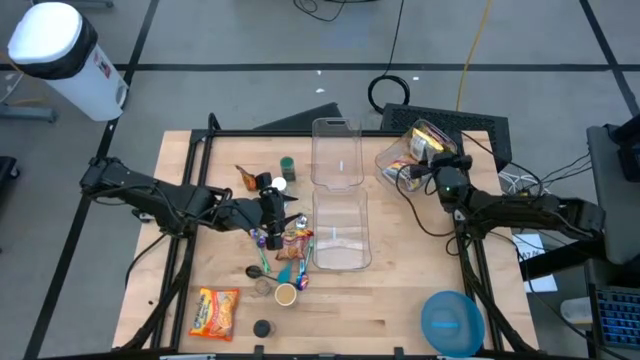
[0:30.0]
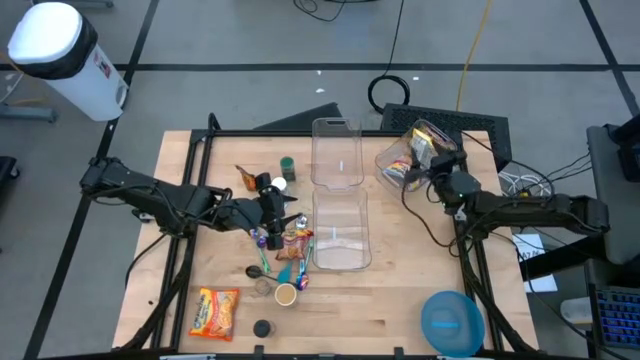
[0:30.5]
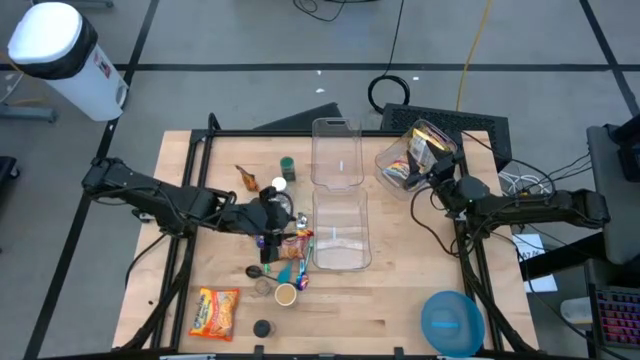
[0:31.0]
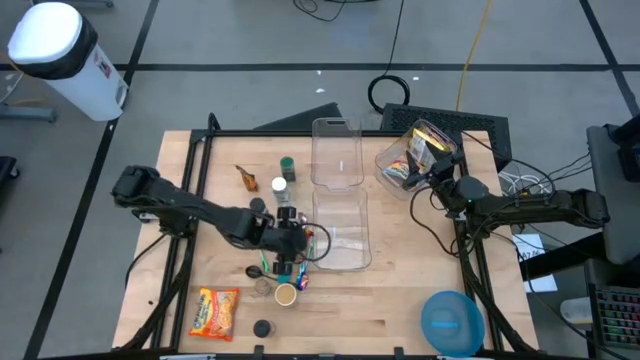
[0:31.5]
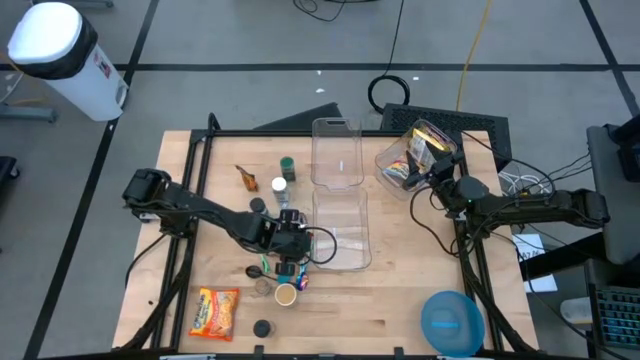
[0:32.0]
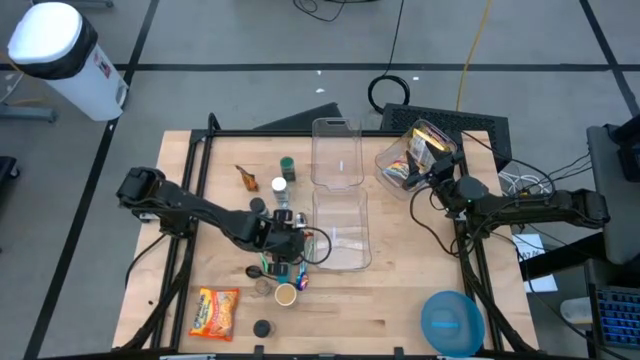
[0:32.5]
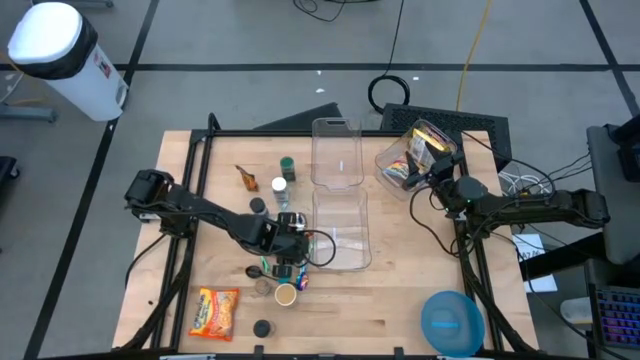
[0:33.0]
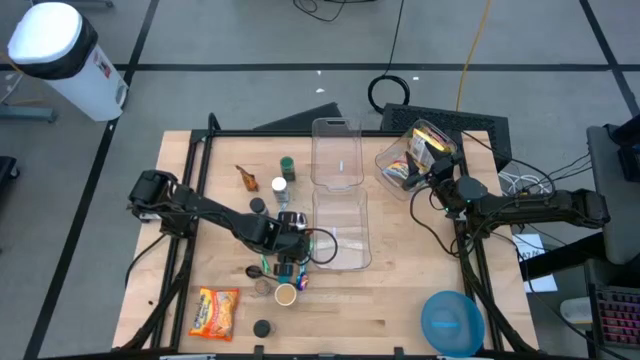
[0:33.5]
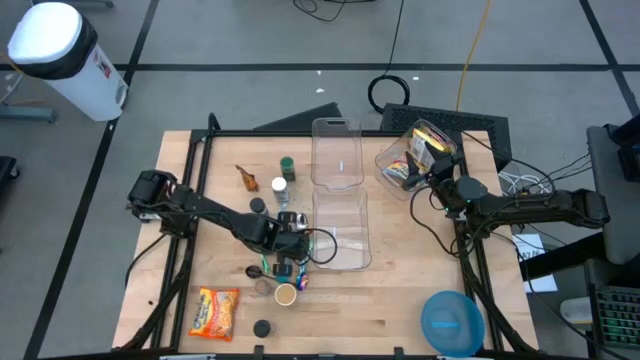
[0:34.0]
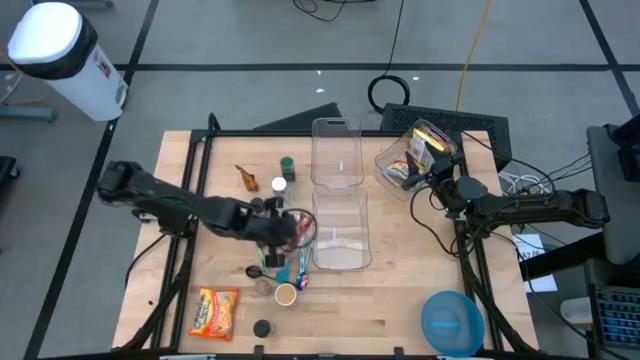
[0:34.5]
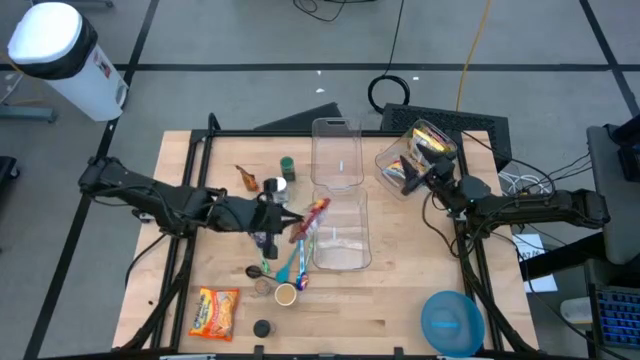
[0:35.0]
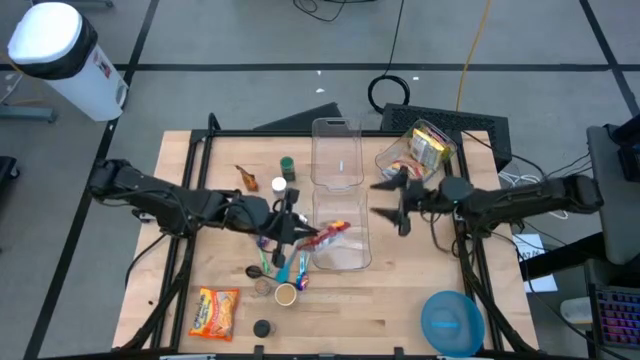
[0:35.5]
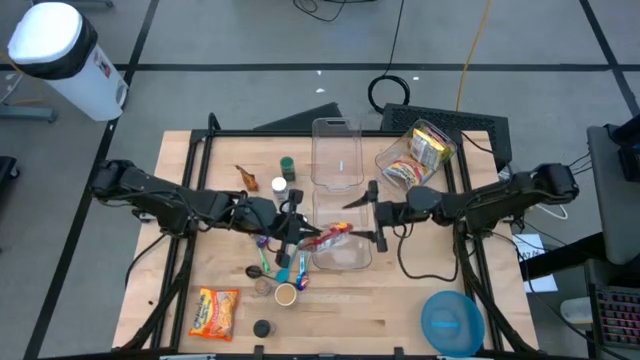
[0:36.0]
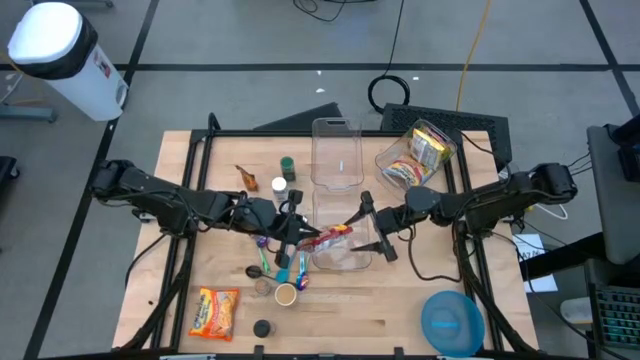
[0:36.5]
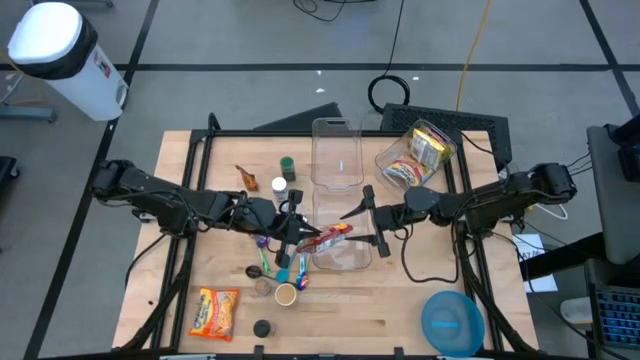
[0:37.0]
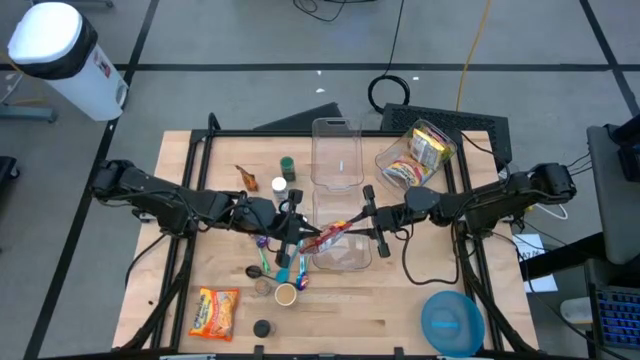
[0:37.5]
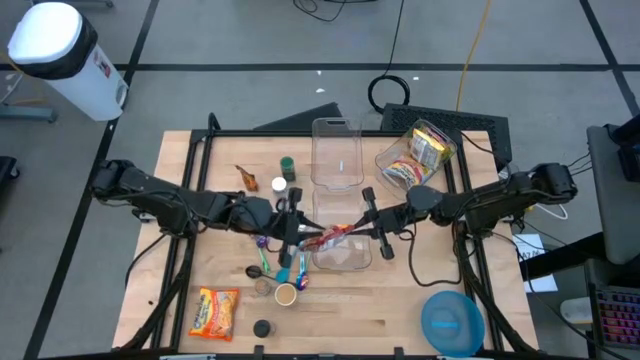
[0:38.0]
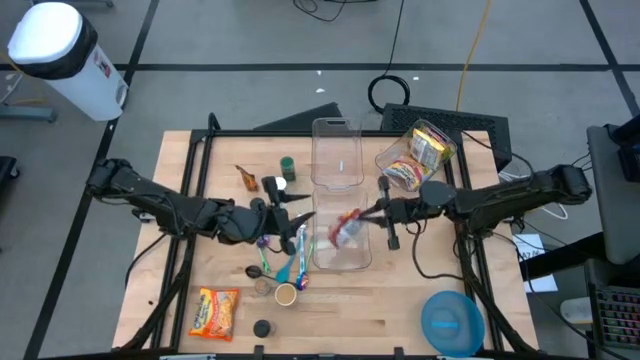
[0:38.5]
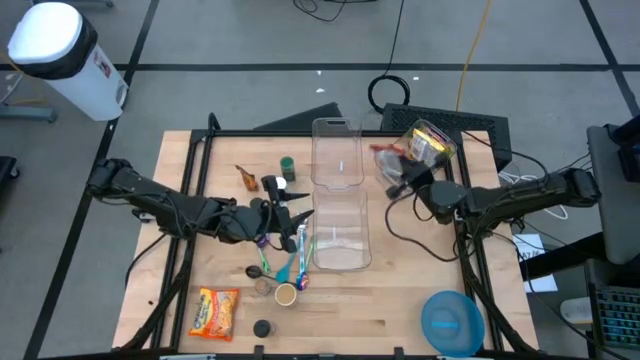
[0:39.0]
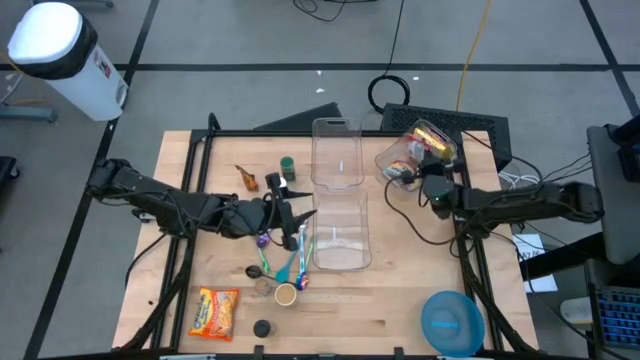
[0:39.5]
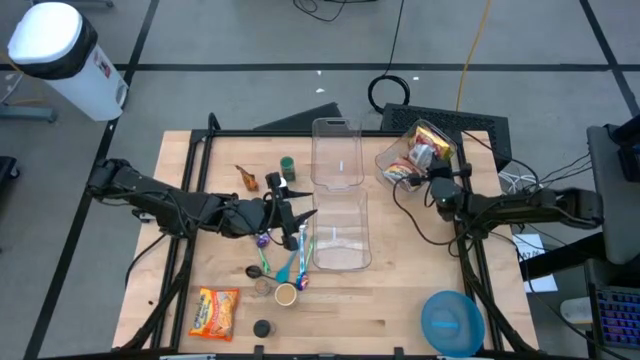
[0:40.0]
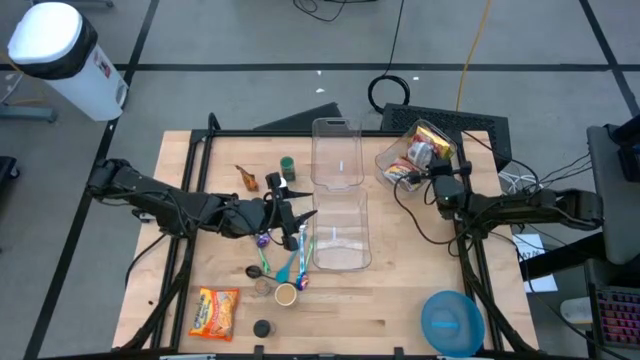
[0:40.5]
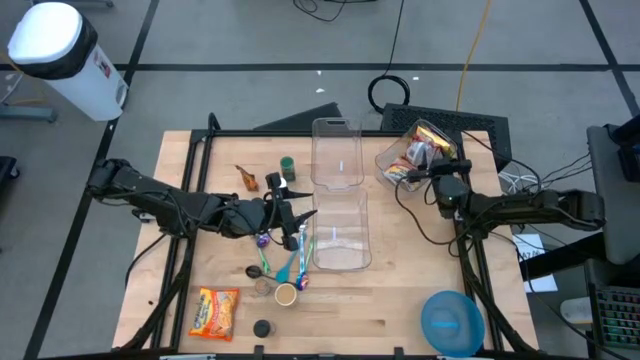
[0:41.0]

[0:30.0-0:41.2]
Task: Pick & Place Food Item
Put the red noodle pack into the top right transparent bin

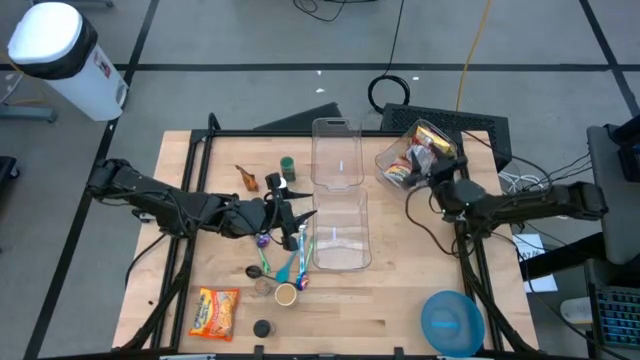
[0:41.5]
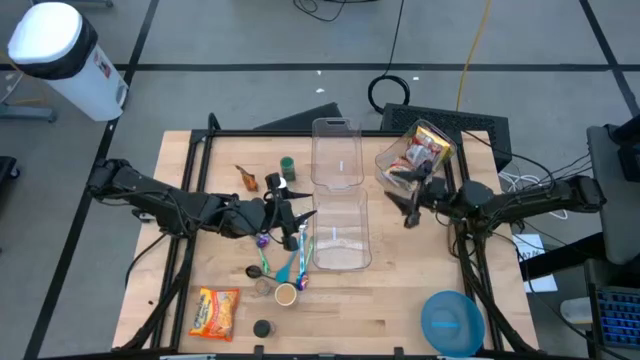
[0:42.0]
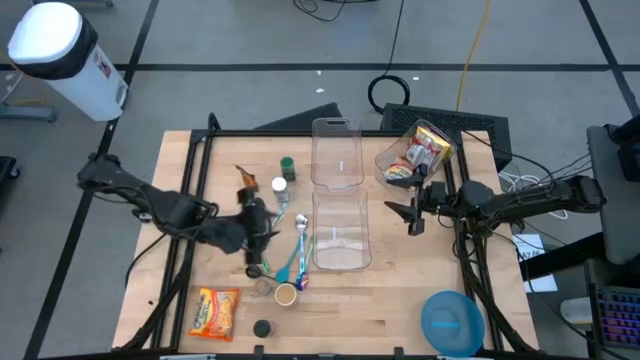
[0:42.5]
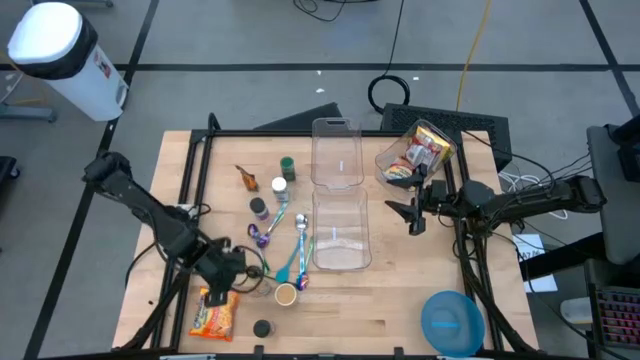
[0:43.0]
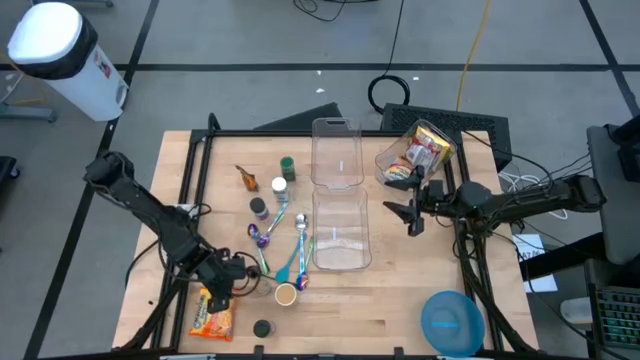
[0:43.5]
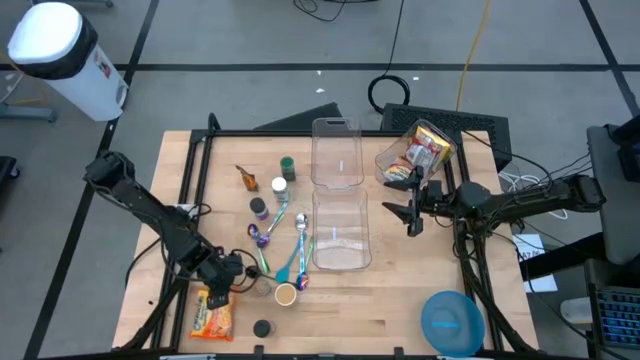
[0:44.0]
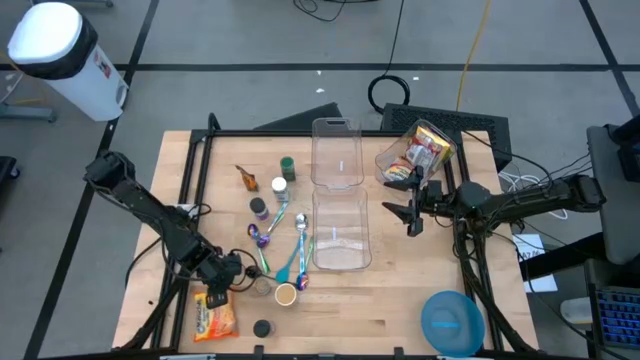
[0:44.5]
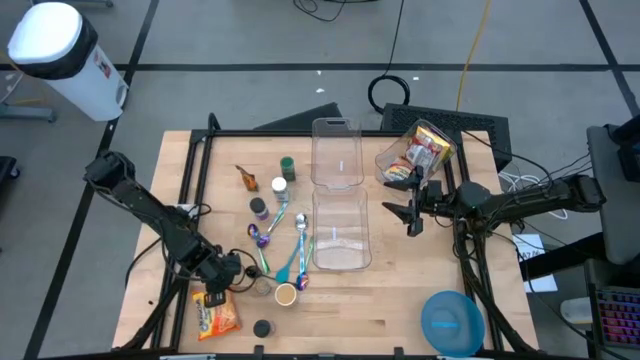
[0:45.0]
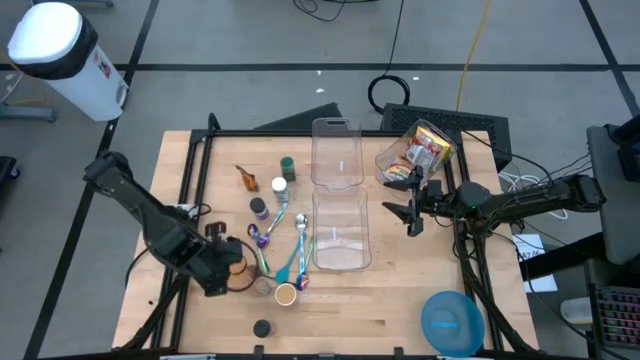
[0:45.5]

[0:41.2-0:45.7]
Put the orange noodle pack into the top right transparent bin

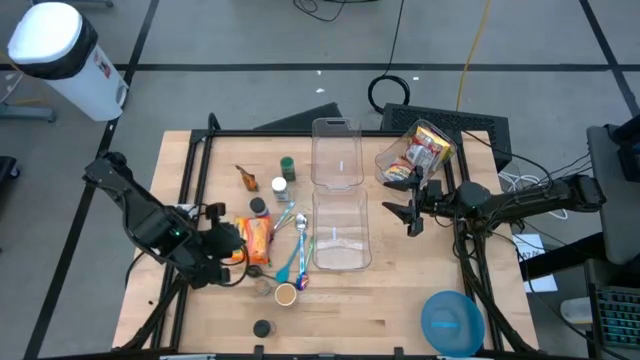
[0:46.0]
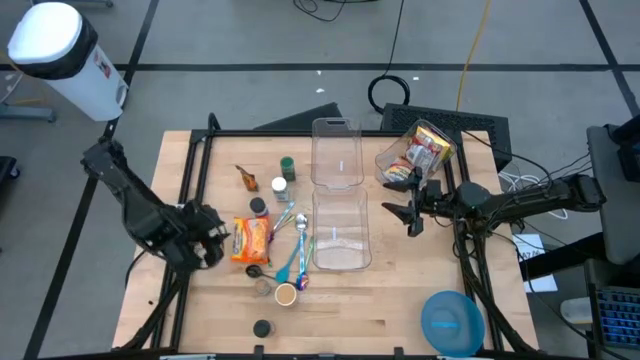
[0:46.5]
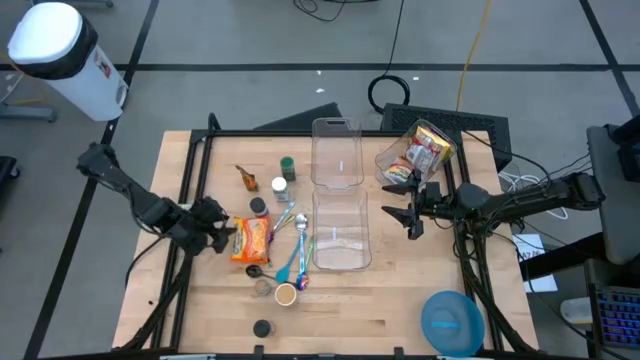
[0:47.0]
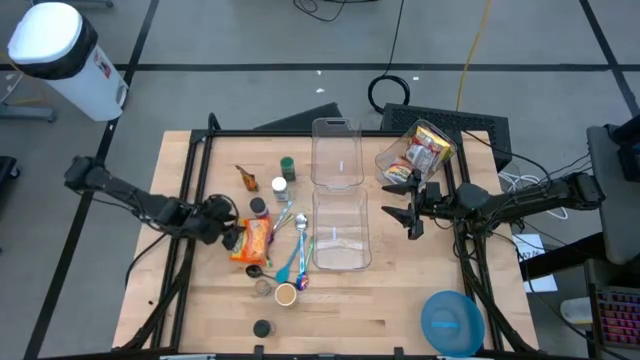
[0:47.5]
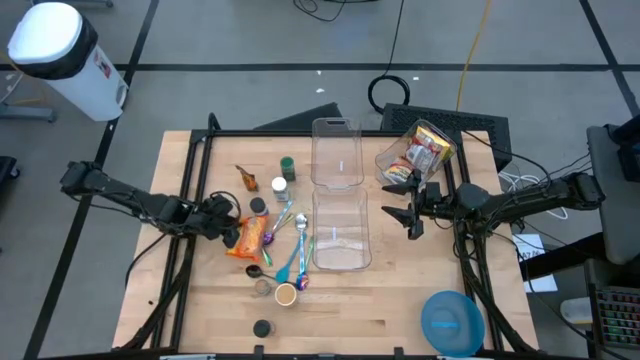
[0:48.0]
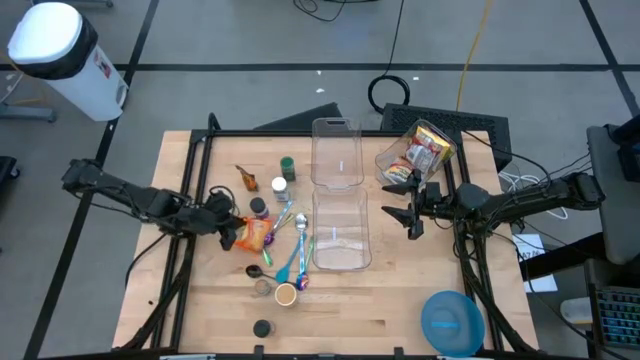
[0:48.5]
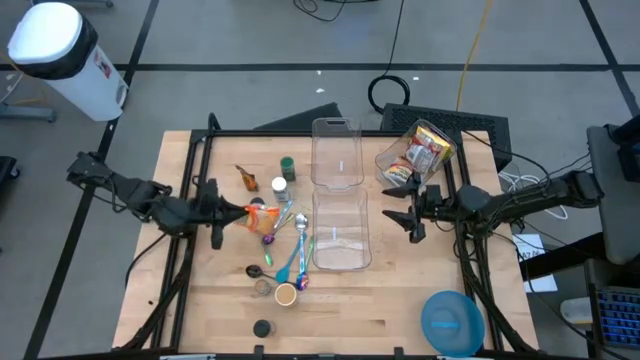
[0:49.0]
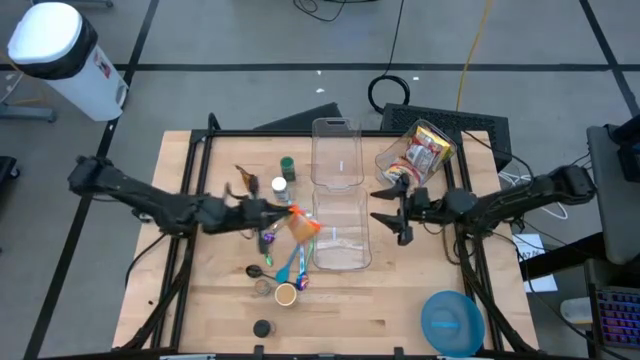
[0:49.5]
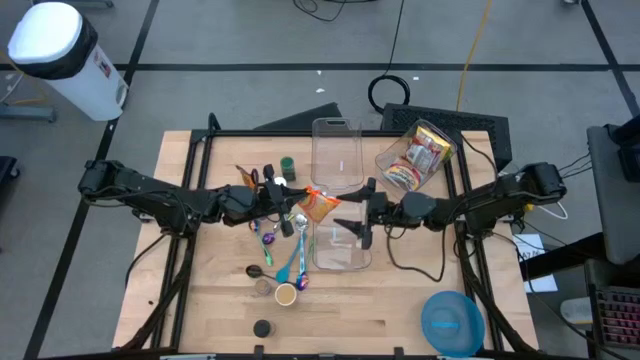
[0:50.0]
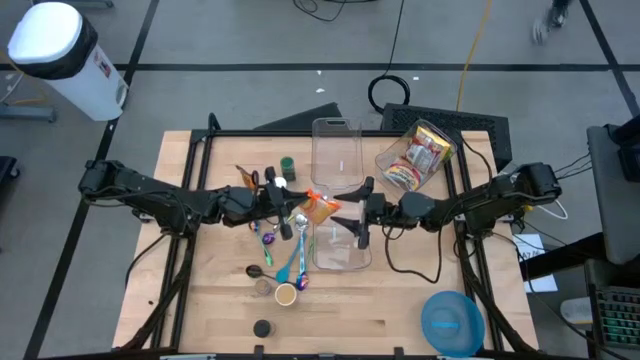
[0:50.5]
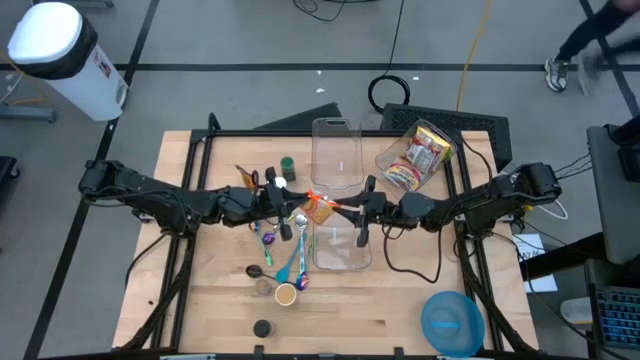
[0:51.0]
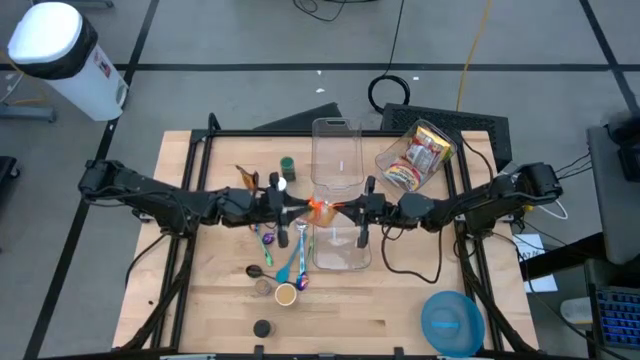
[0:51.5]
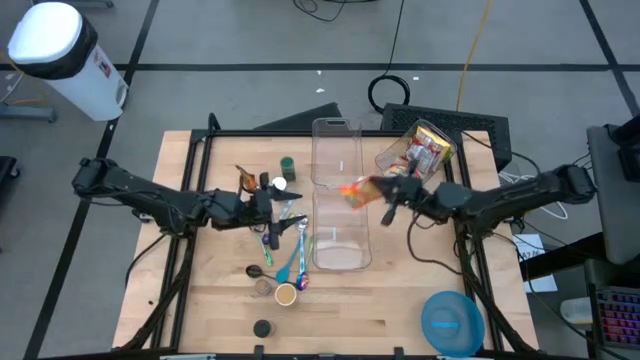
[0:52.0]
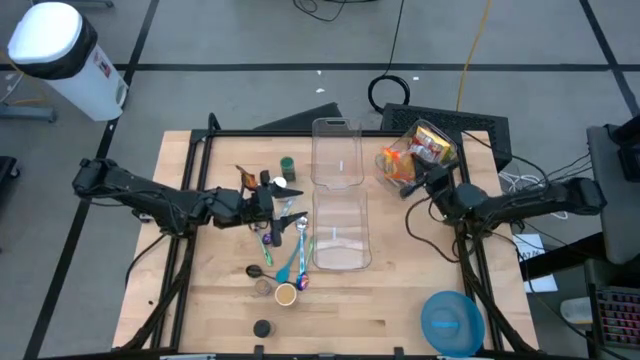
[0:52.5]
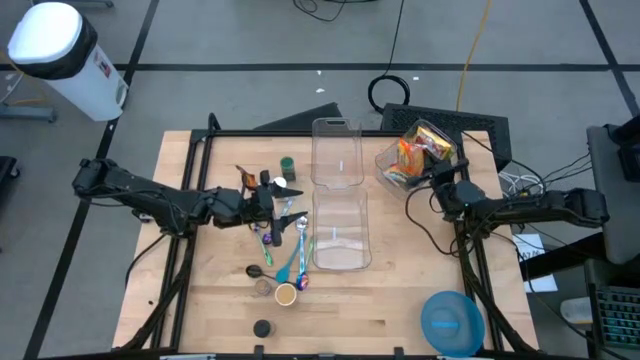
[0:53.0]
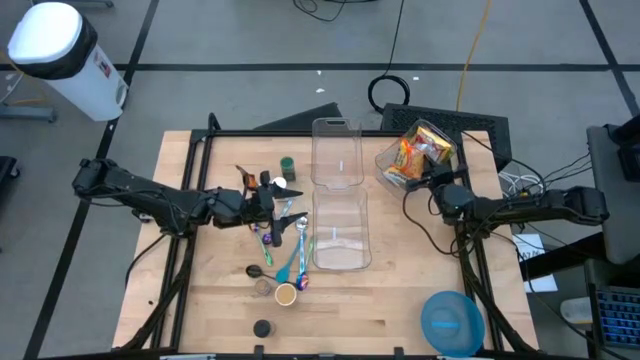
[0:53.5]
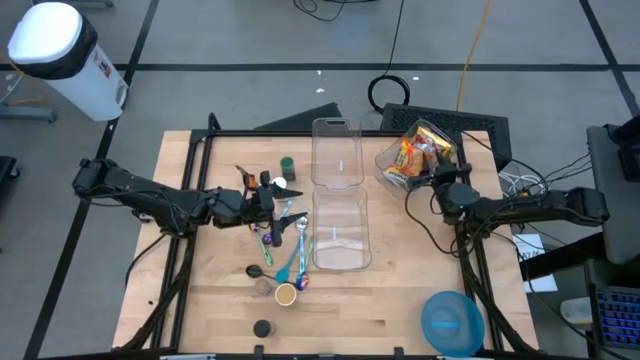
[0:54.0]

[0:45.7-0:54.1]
Put the orange noodle pack into the top right transparent bin
